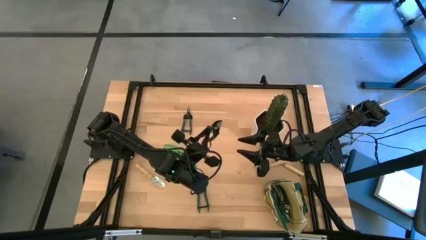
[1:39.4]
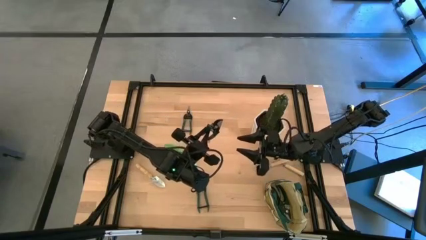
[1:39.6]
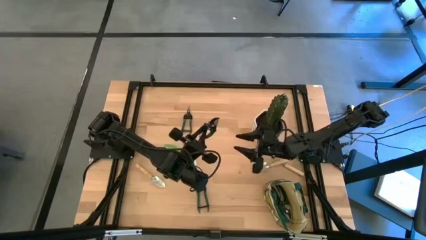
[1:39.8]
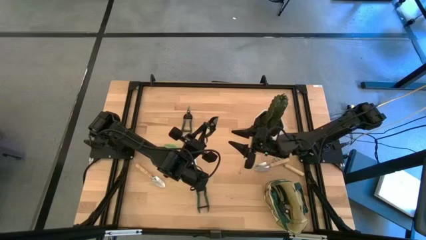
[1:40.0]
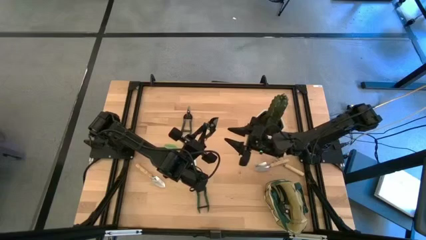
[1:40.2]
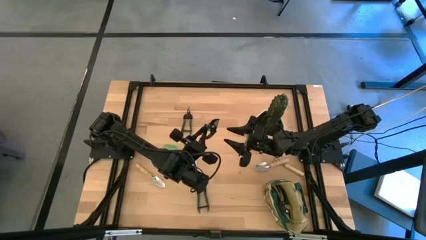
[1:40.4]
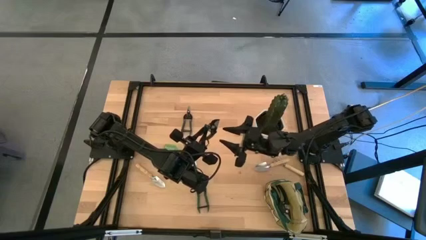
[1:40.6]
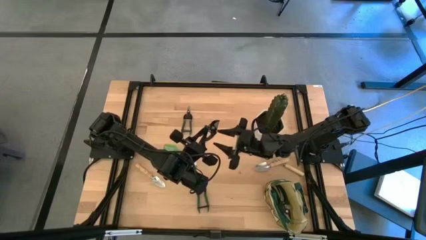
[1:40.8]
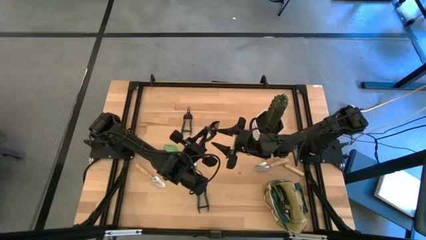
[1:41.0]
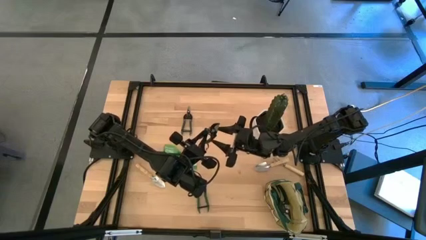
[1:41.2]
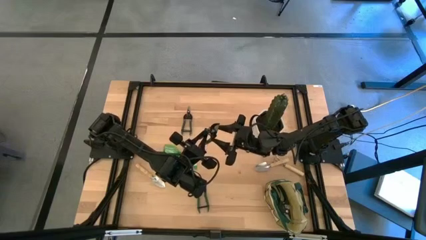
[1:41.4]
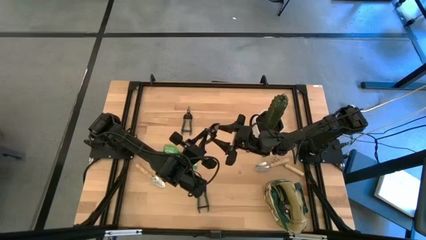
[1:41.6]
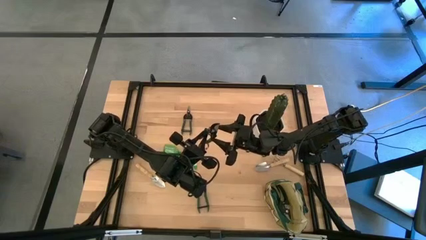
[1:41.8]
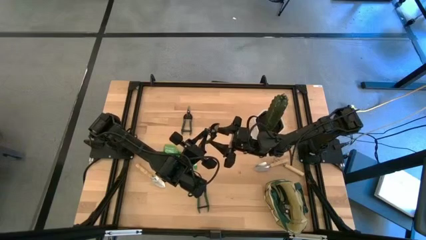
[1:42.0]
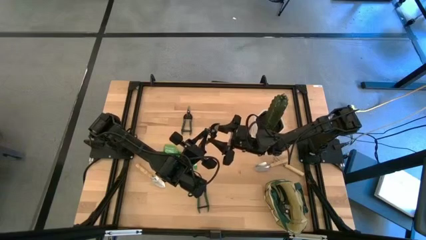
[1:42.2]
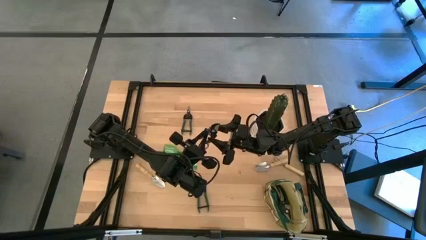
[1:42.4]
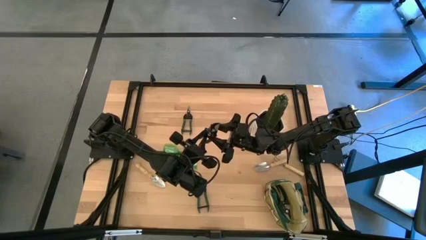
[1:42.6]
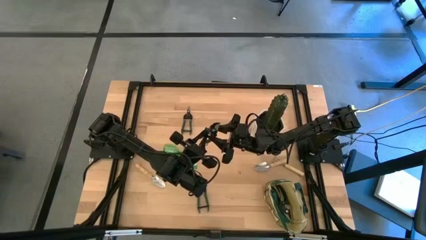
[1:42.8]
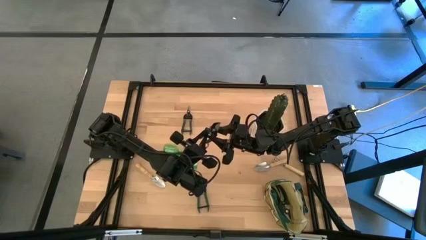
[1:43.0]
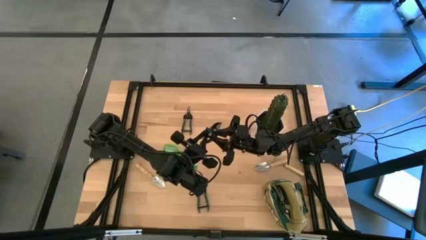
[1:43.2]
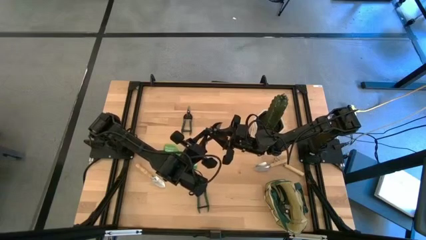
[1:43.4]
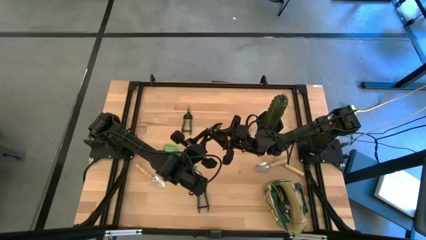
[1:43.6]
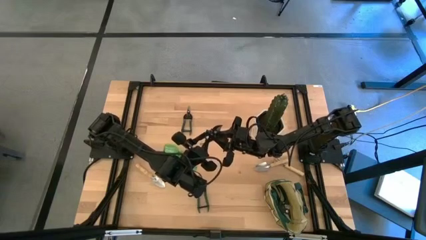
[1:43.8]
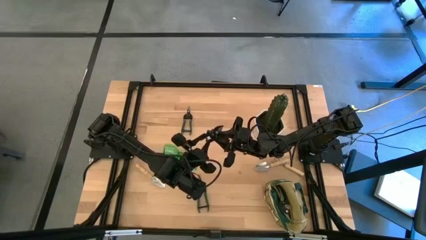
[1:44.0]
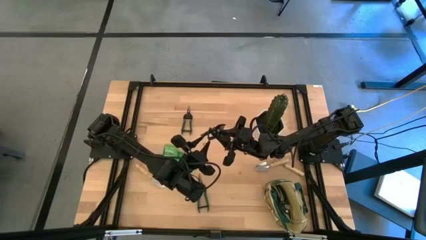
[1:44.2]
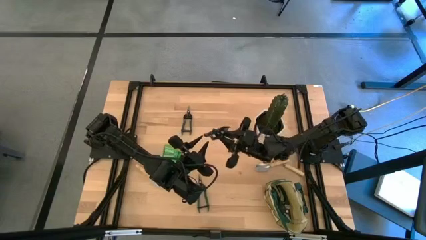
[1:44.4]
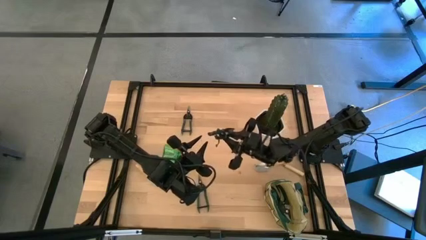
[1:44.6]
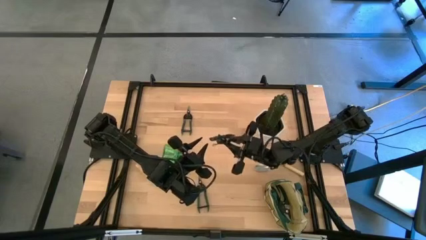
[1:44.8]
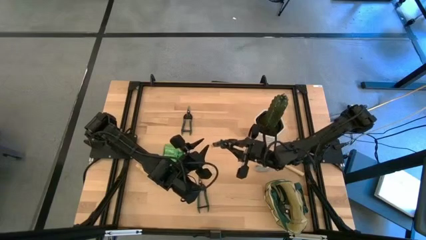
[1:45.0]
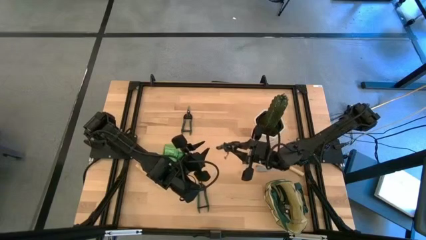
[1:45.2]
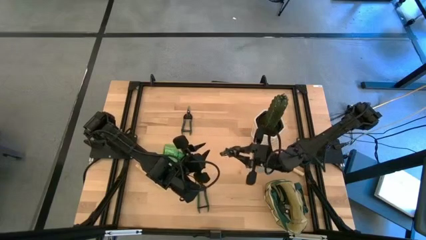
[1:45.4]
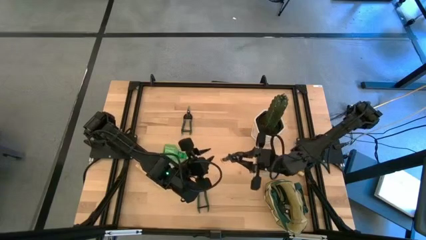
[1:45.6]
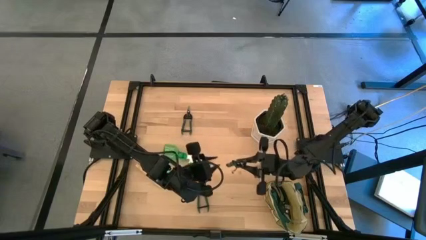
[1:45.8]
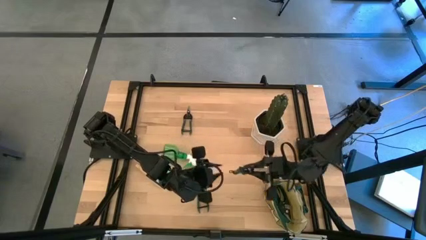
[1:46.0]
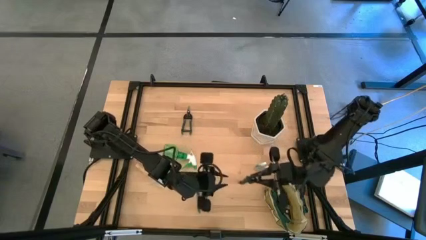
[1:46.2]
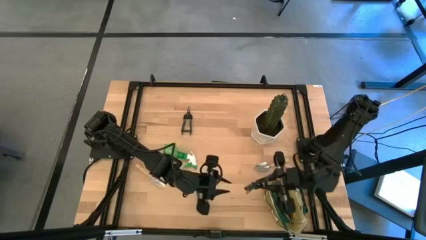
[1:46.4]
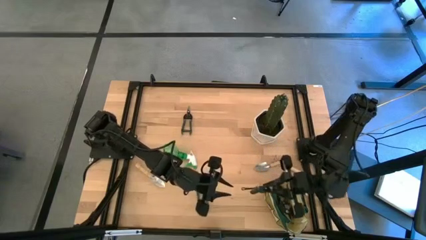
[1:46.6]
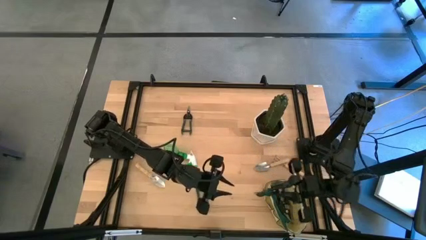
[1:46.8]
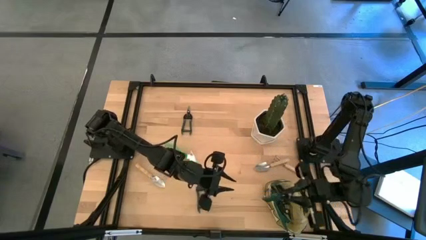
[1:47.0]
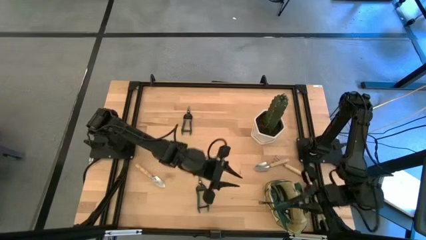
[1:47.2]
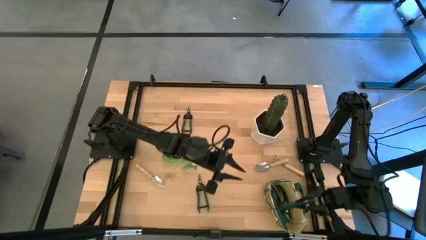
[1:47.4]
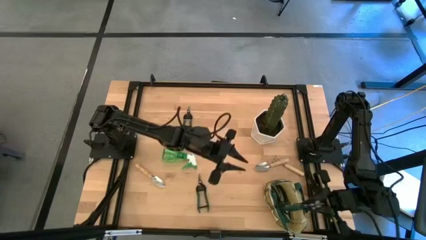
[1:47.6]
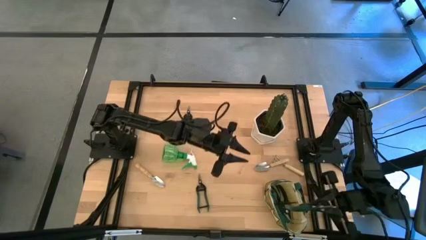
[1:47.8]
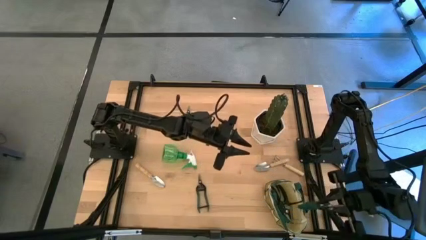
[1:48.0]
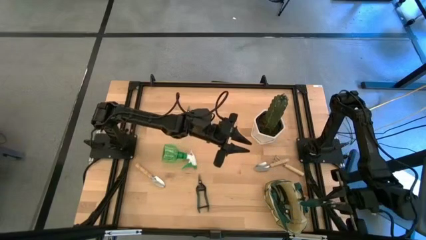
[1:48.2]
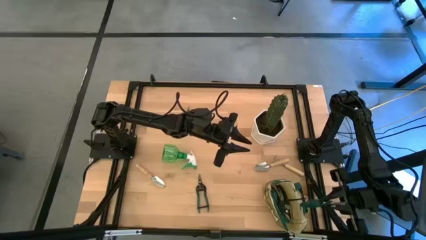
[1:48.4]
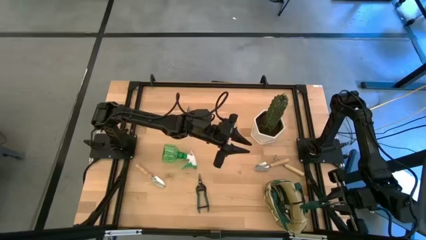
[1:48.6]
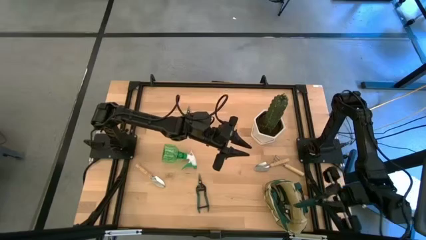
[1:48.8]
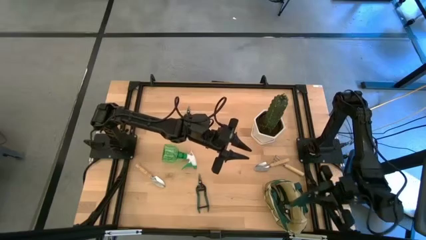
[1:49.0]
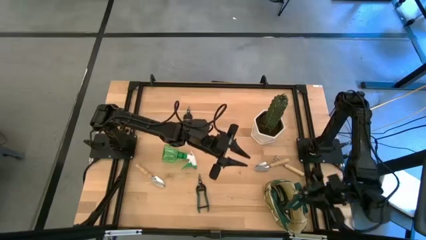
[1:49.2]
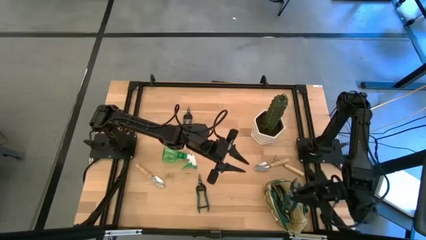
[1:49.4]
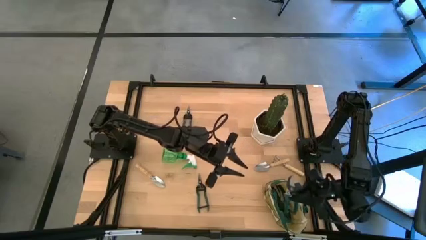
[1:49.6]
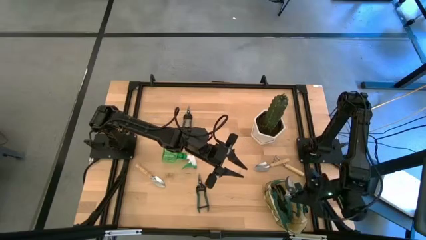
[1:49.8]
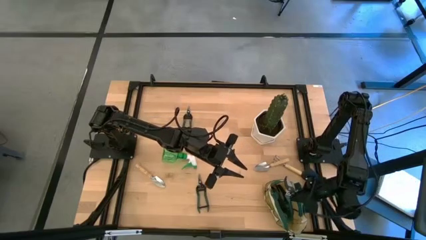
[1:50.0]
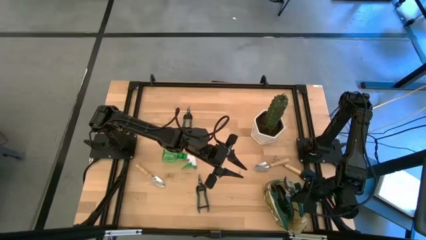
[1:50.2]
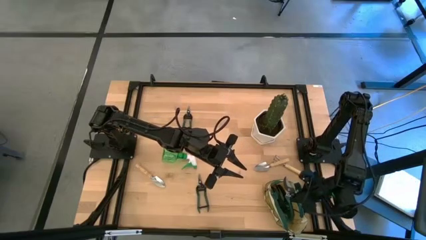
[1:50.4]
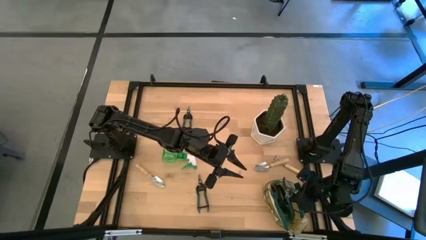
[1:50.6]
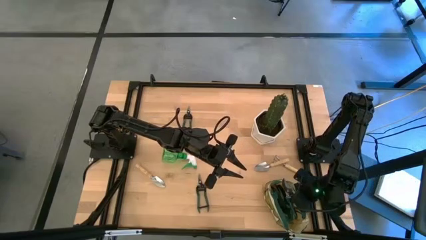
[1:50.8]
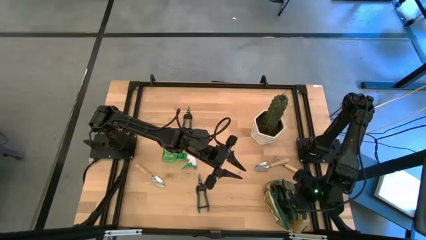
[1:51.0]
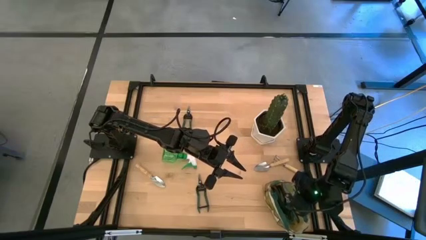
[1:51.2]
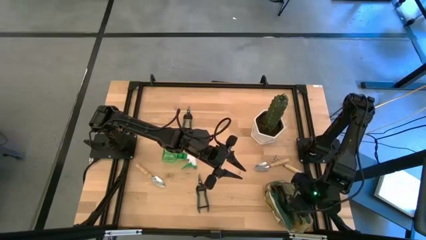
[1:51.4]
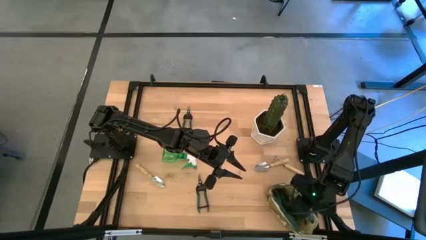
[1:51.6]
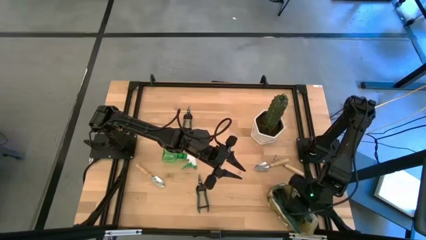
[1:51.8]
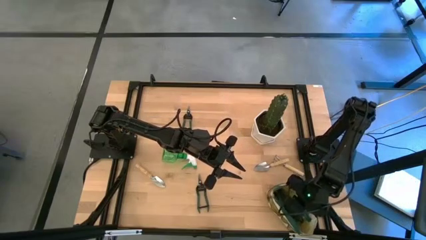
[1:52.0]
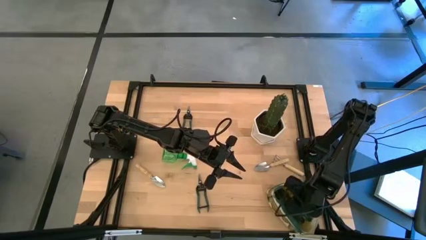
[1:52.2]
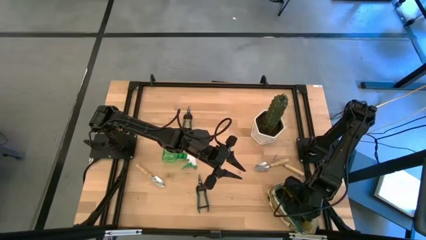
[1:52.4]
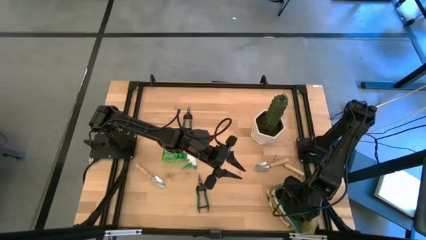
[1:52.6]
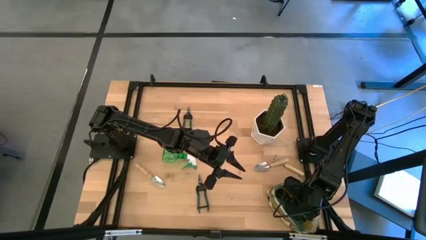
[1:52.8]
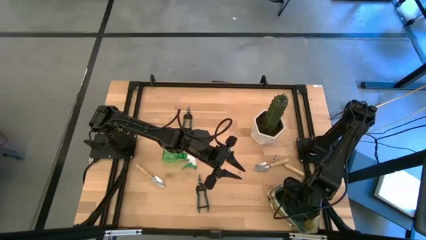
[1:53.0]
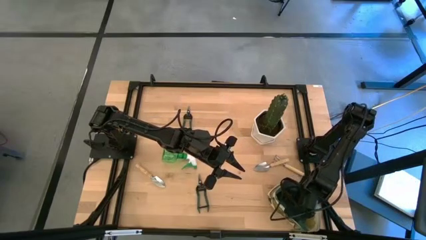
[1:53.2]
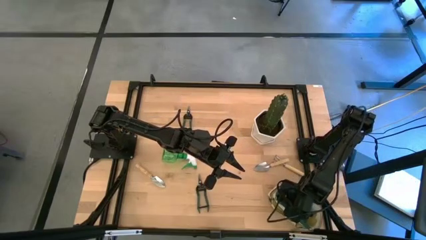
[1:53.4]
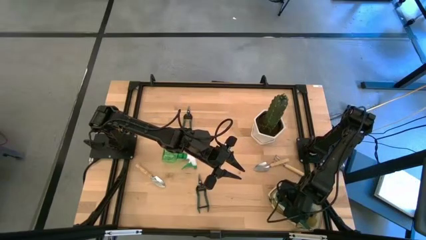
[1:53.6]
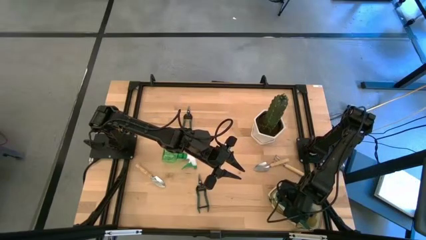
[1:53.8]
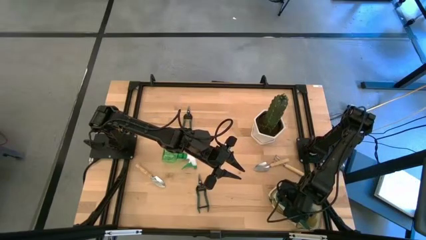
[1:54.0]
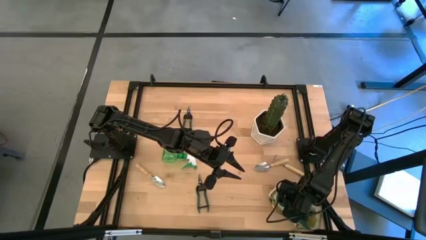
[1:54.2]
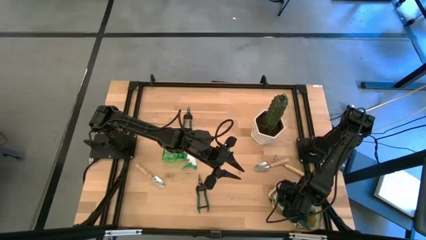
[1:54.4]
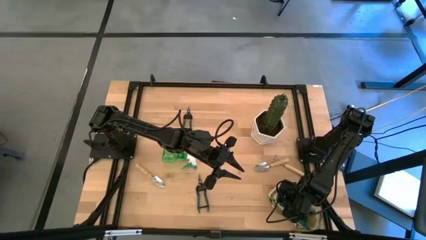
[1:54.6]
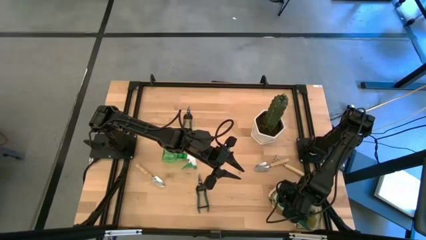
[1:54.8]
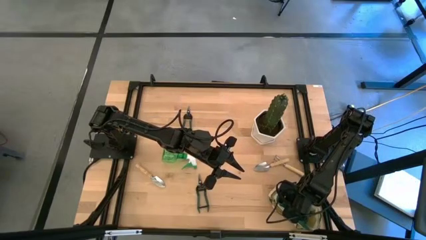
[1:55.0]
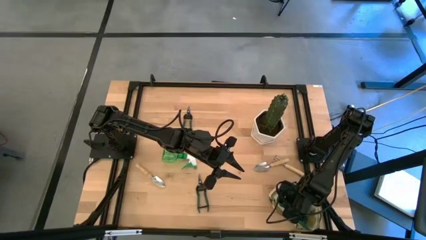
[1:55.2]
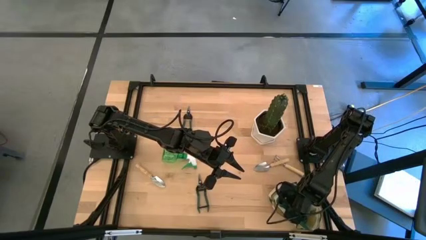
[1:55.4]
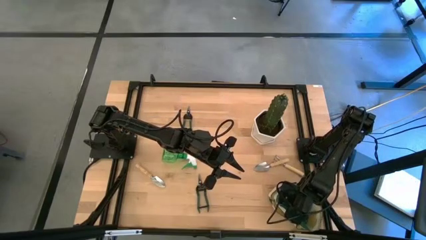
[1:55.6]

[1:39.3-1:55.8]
Task: Pick & Place Garden tools in Gardening bag
Put the hand pruner into the white bag
